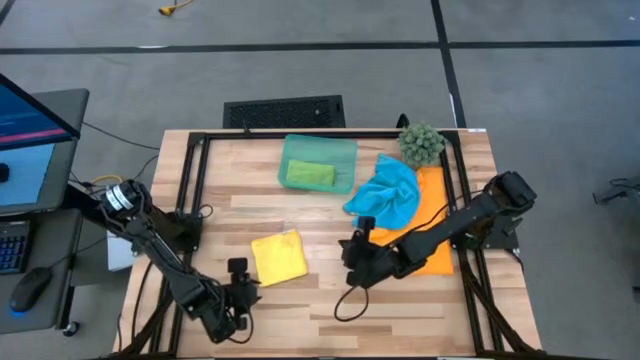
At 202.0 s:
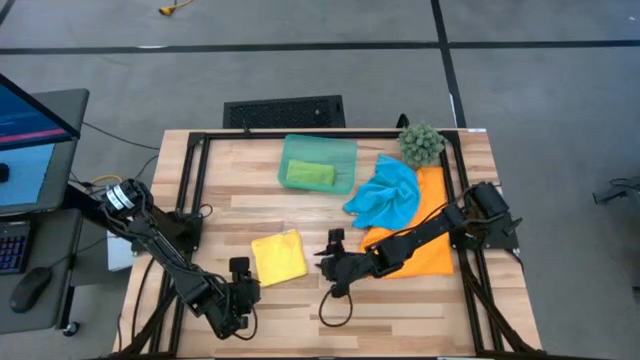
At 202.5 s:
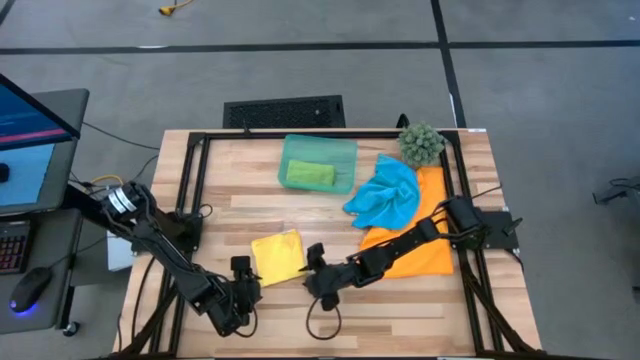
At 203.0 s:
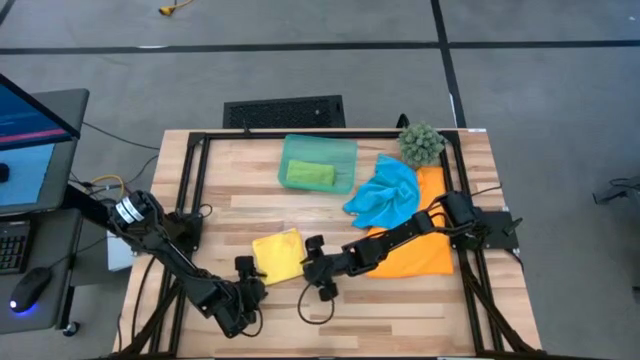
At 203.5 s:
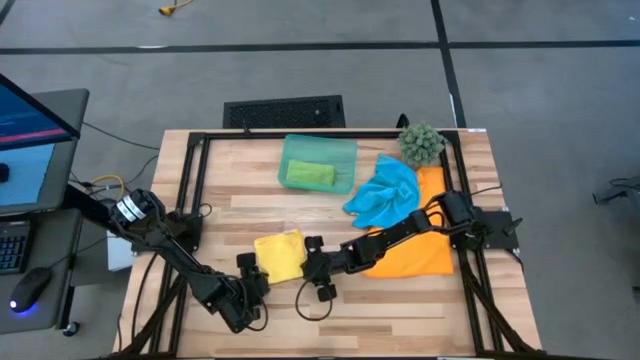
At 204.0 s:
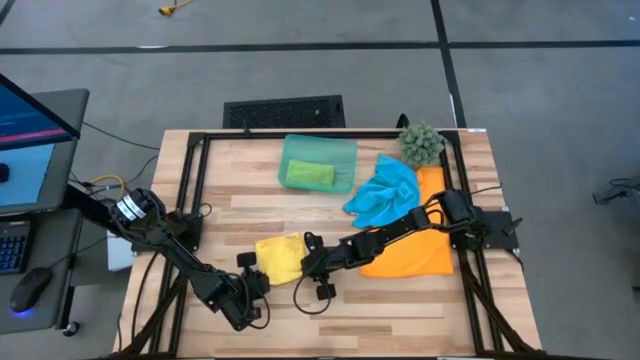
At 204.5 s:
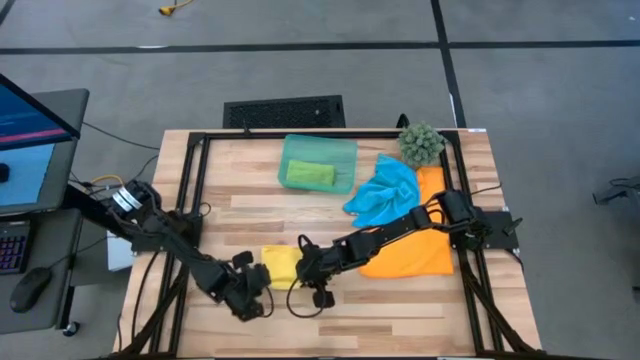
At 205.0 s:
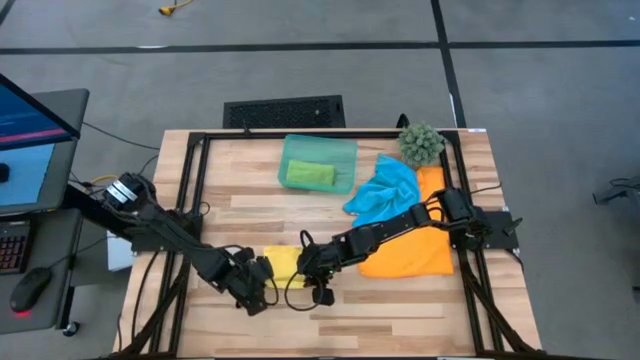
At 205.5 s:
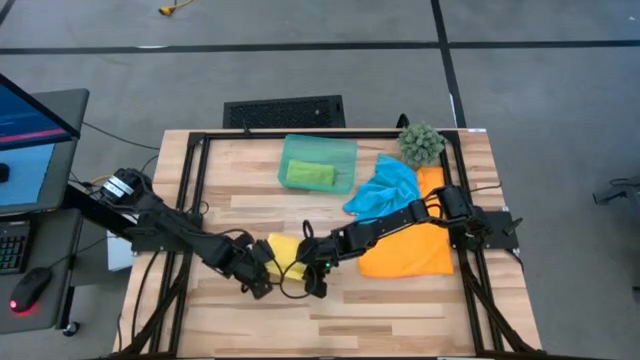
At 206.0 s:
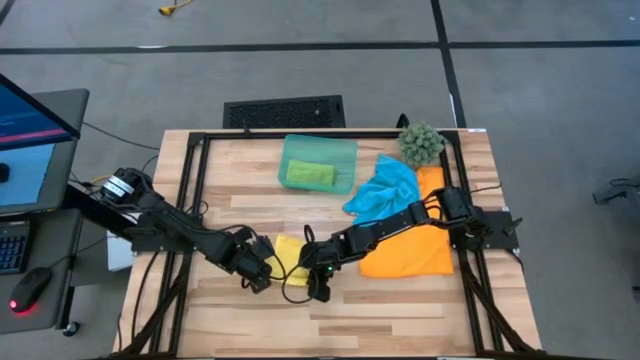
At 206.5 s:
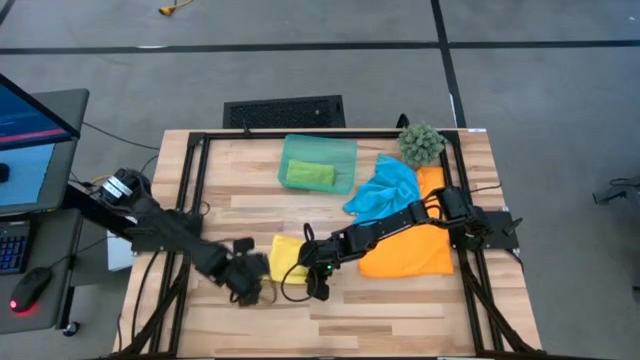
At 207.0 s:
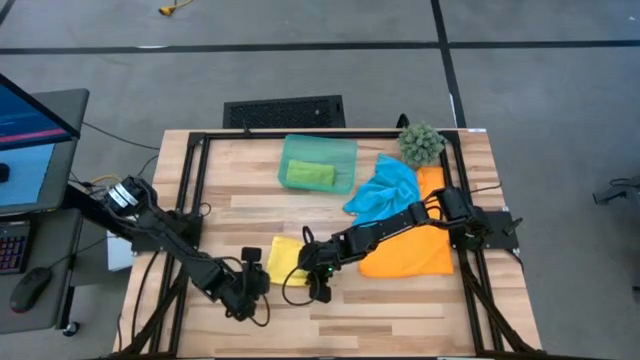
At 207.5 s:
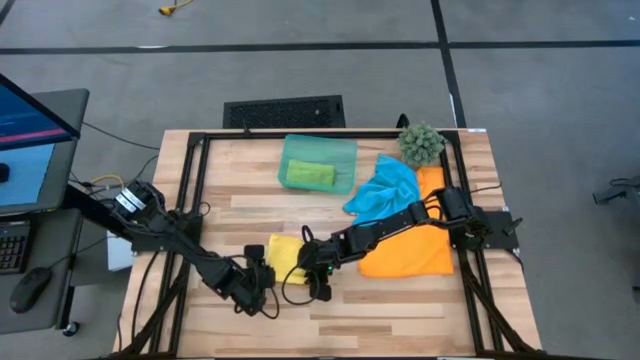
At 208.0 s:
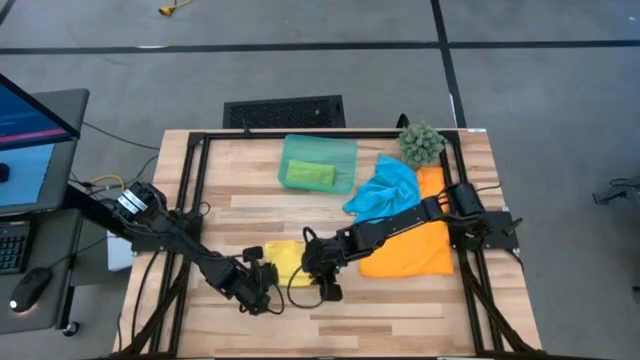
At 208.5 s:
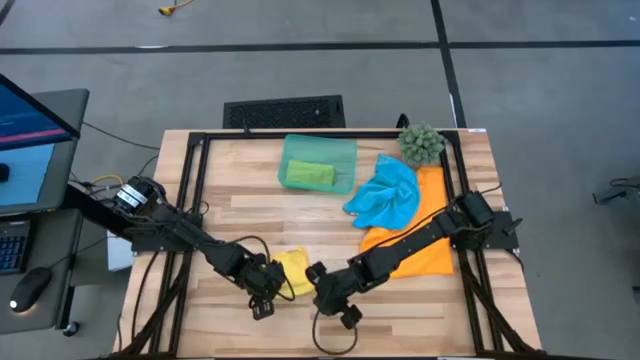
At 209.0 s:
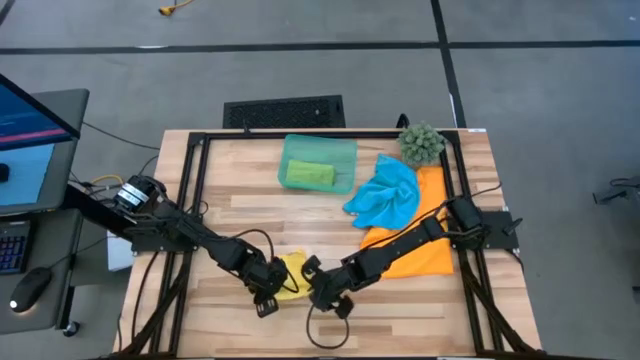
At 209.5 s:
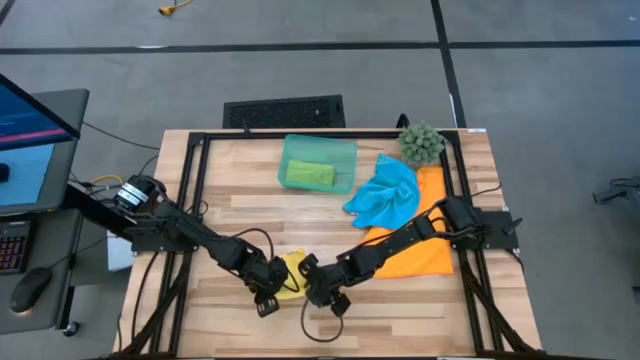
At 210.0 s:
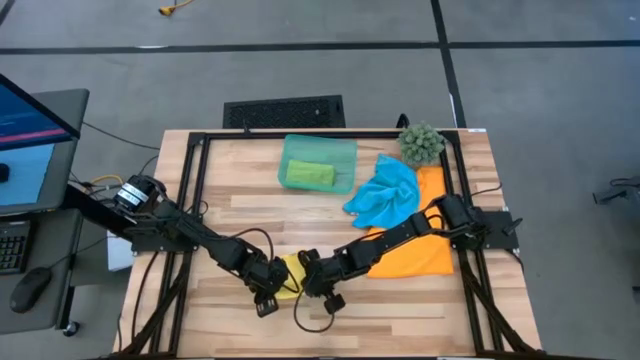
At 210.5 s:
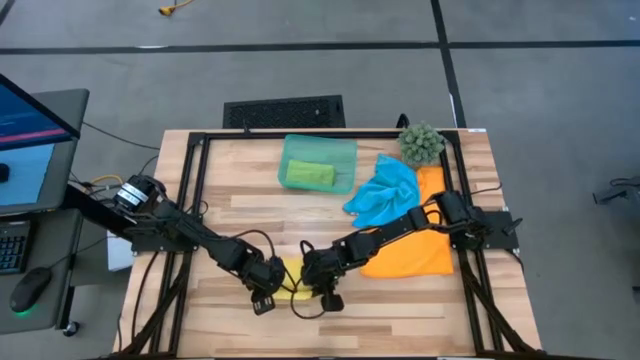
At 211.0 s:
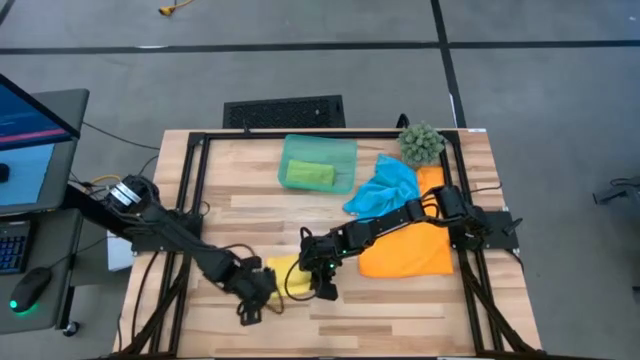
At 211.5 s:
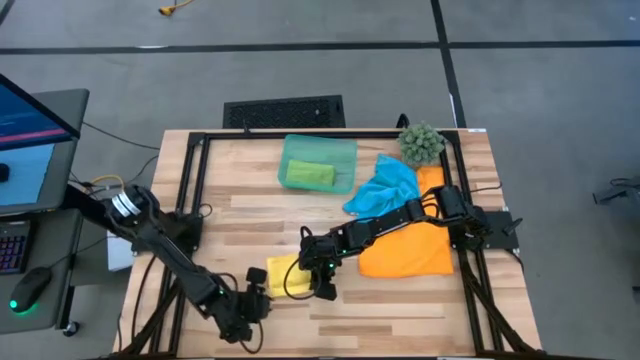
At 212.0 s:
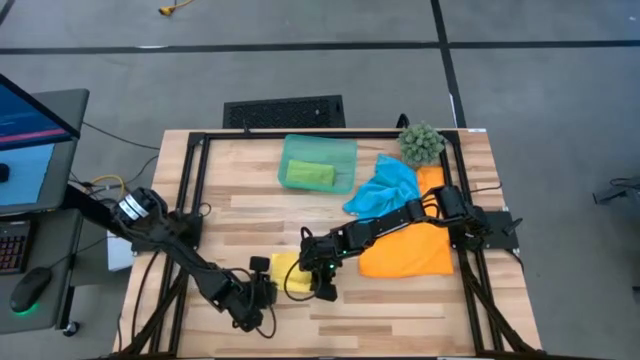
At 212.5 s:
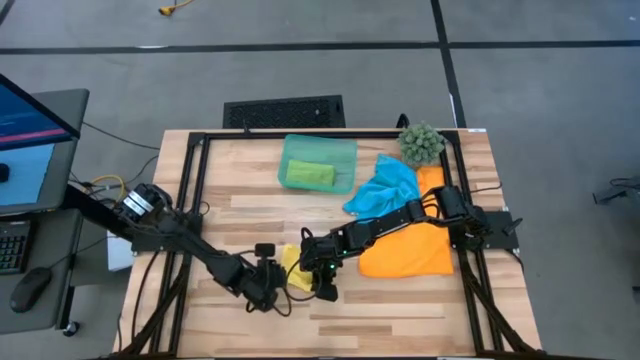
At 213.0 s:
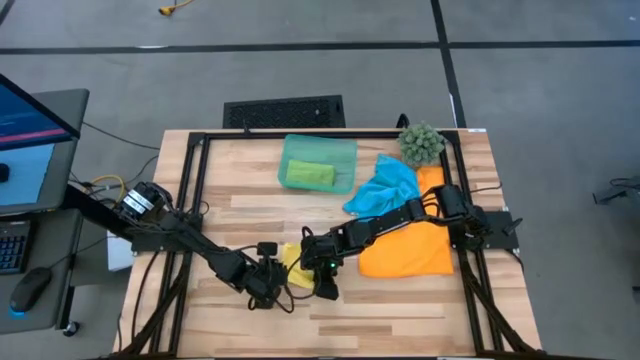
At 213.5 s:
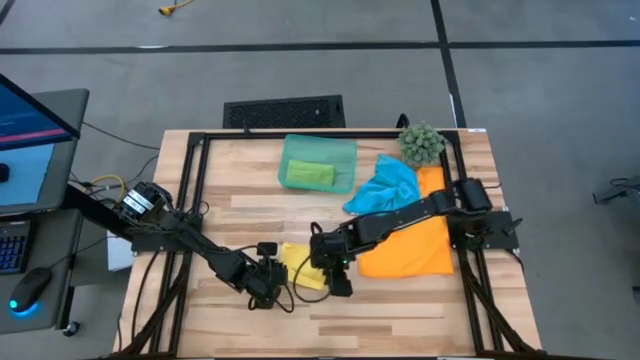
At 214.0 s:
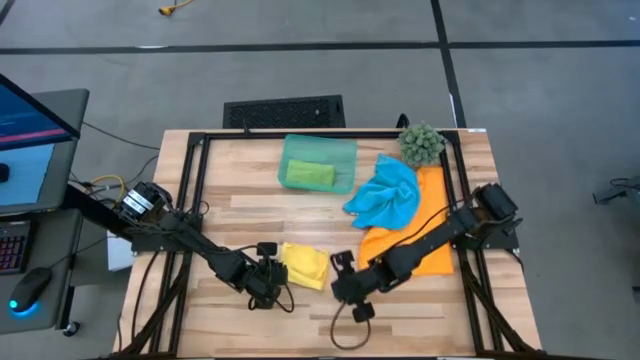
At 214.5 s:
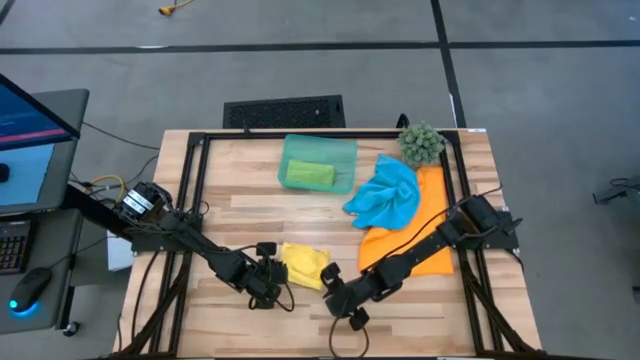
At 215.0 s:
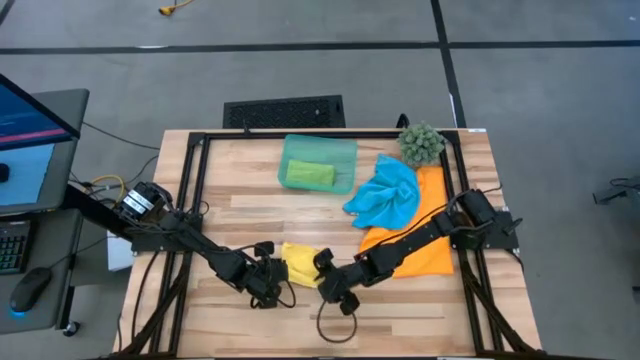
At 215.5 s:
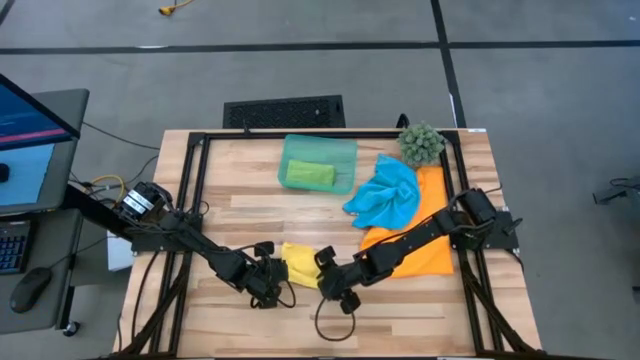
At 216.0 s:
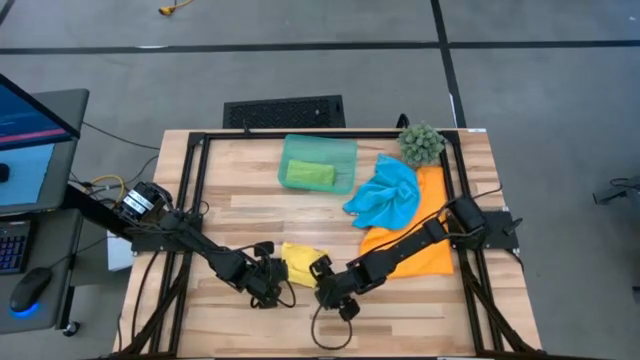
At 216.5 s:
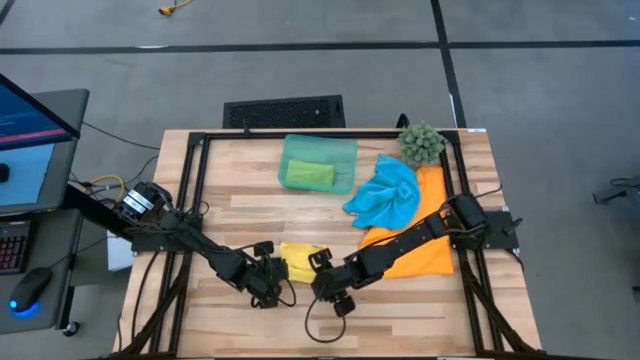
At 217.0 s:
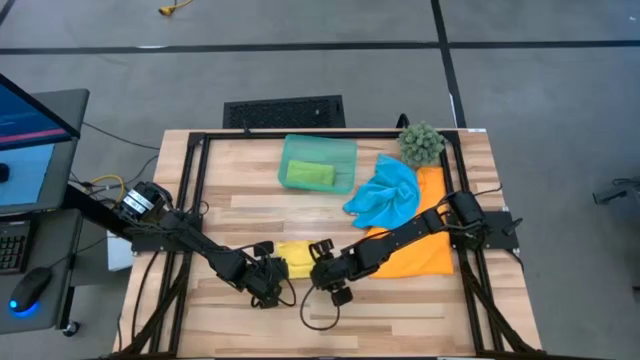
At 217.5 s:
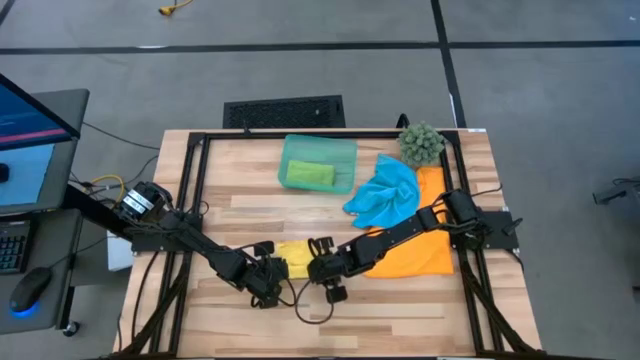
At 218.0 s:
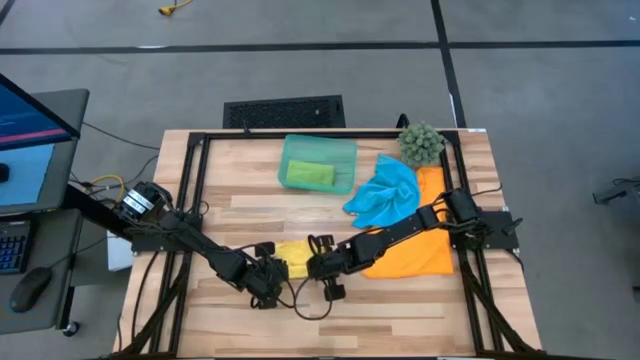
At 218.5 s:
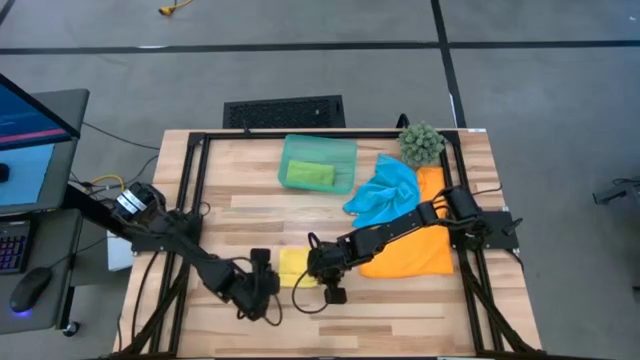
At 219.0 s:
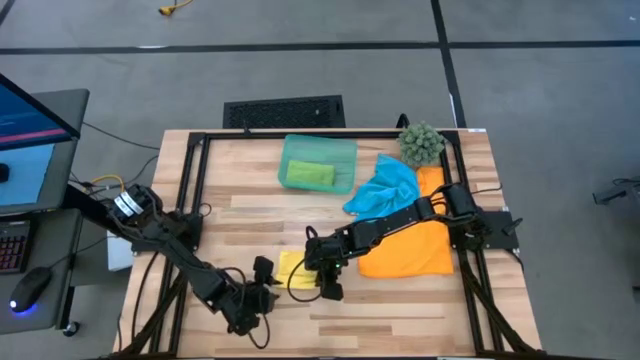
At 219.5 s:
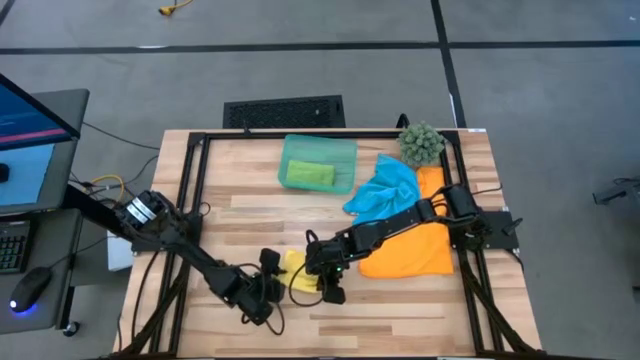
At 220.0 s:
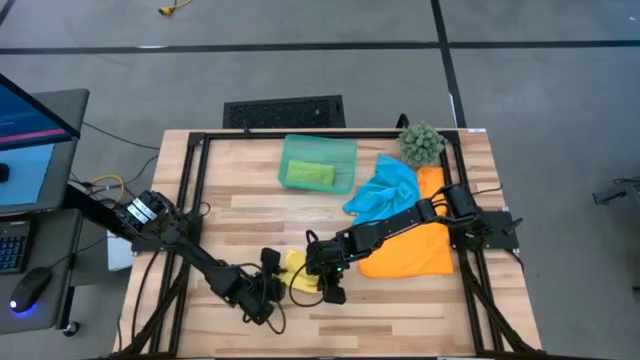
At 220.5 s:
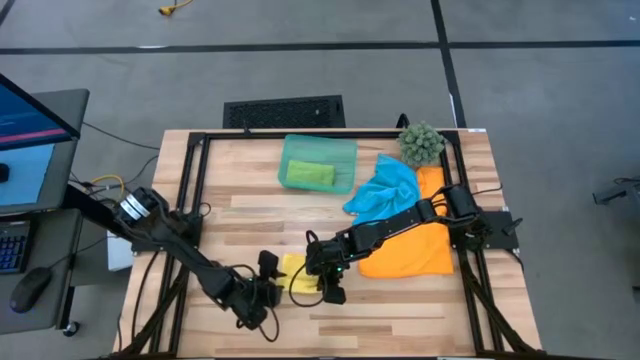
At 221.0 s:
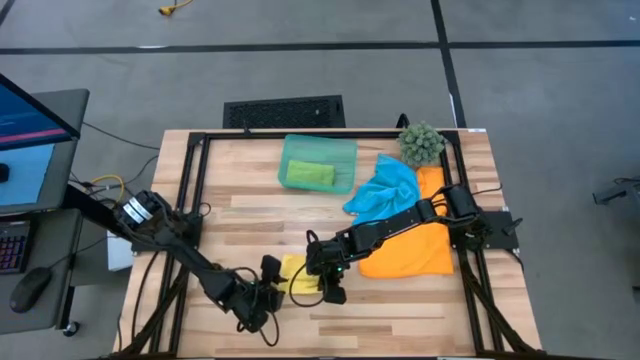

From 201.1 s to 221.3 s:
Task: Roll microfiber towels into tight, uniform cylinder then place into a basket
Roll the yellow microfiber cloth

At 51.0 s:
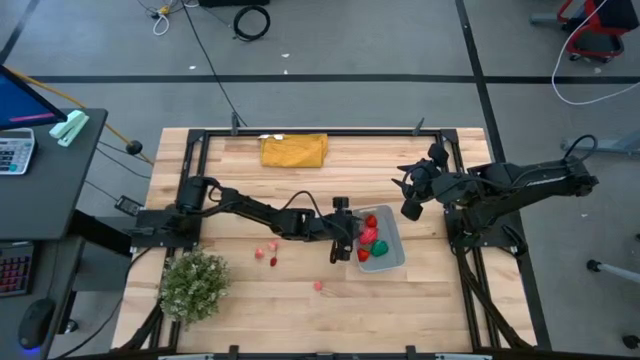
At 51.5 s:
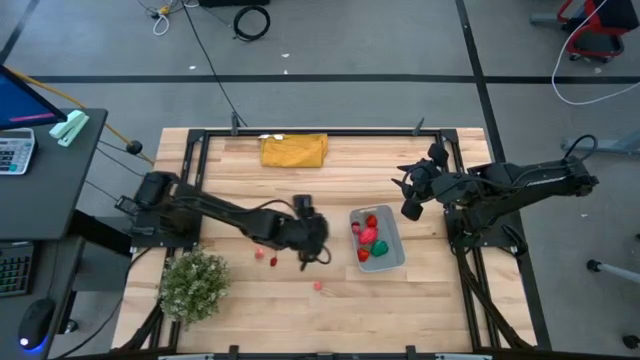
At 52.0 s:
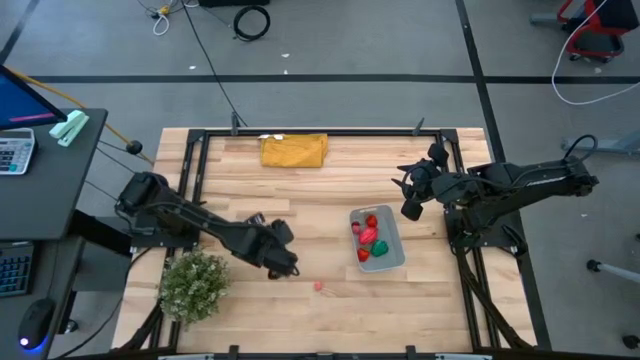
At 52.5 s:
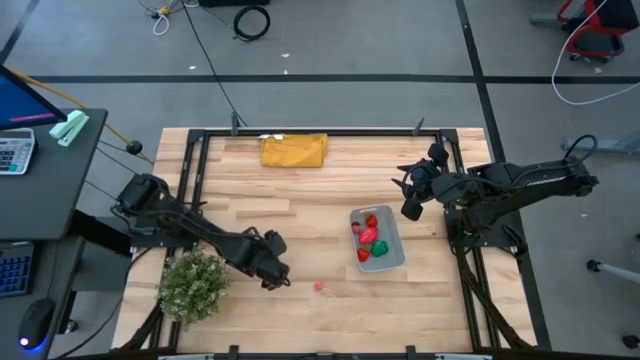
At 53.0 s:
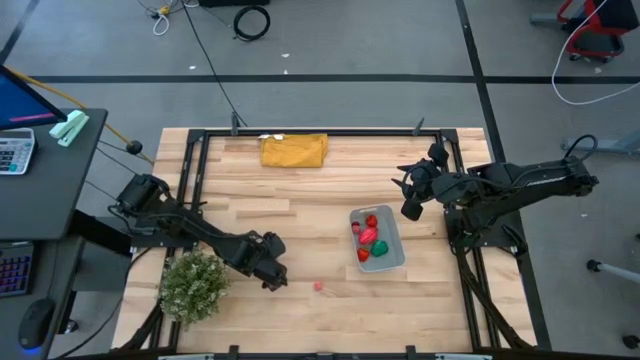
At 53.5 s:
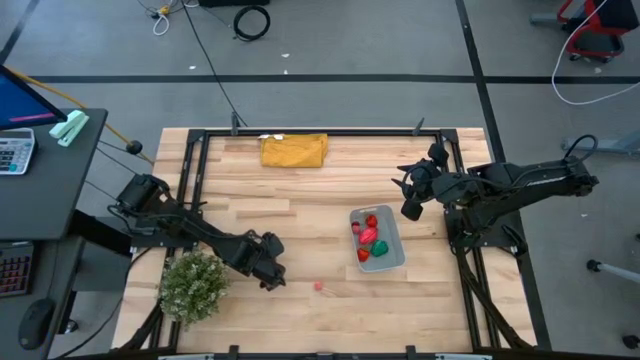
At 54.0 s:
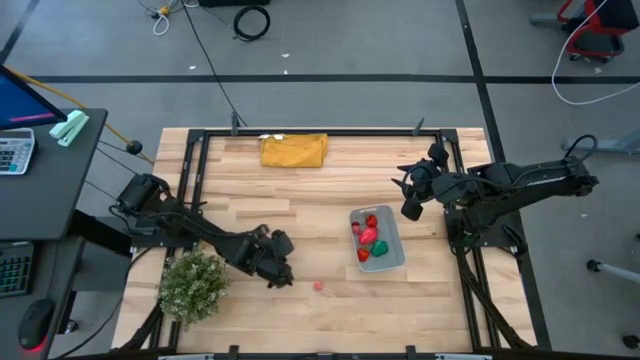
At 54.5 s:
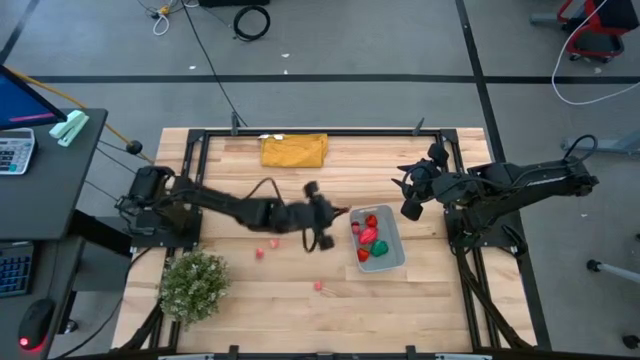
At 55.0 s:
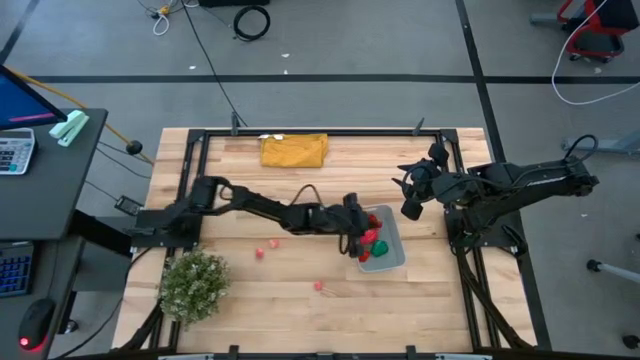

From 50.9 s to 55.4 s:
Task: Pick and placing Produce into tupperware
Put the red cherry into the gray bin
